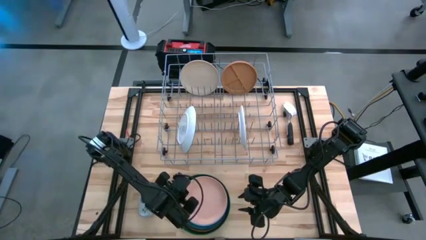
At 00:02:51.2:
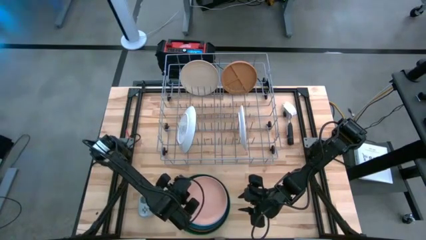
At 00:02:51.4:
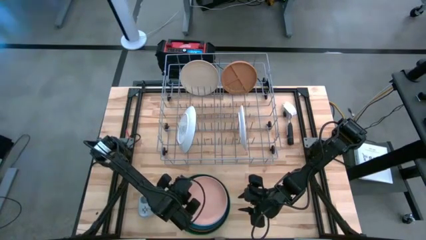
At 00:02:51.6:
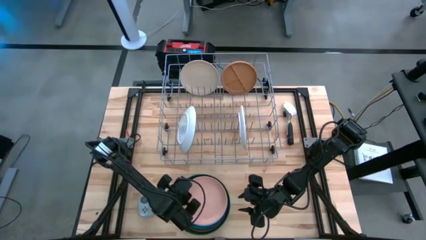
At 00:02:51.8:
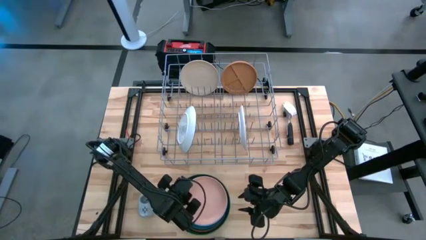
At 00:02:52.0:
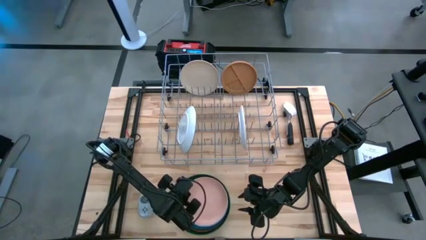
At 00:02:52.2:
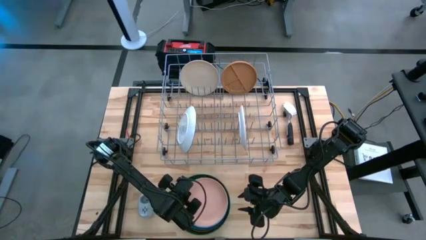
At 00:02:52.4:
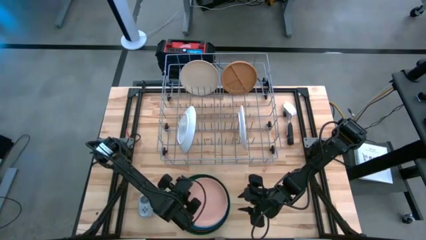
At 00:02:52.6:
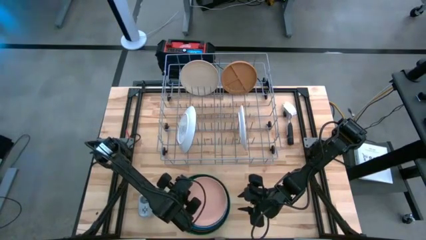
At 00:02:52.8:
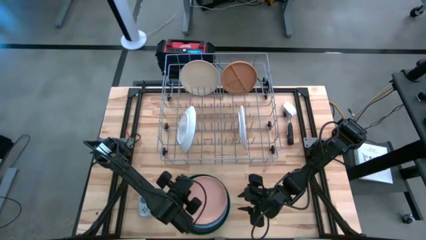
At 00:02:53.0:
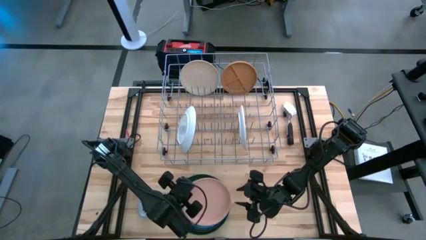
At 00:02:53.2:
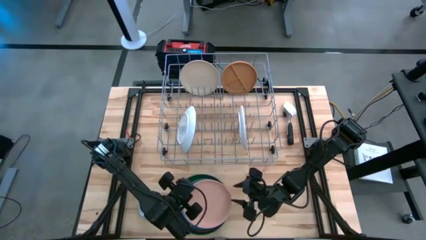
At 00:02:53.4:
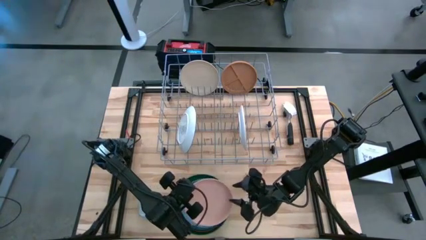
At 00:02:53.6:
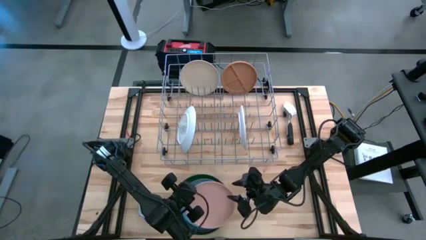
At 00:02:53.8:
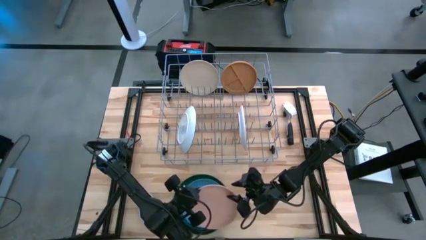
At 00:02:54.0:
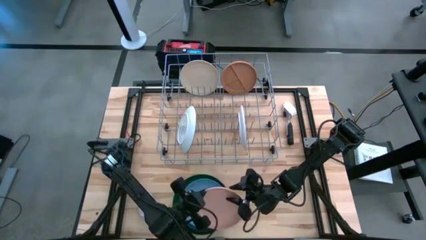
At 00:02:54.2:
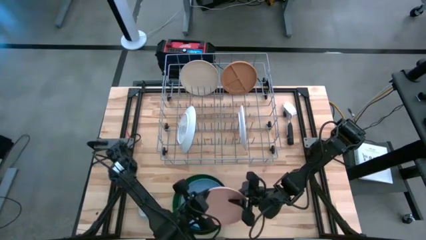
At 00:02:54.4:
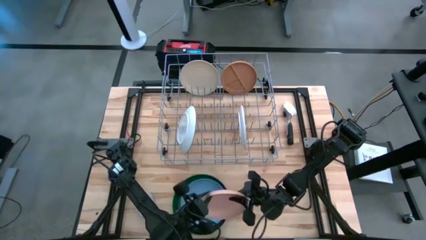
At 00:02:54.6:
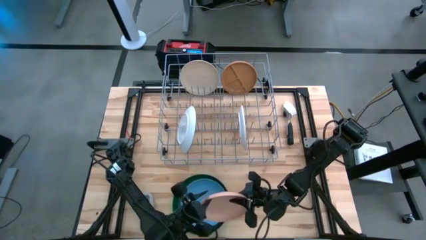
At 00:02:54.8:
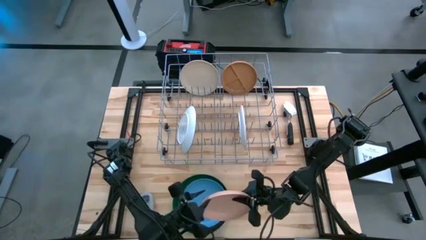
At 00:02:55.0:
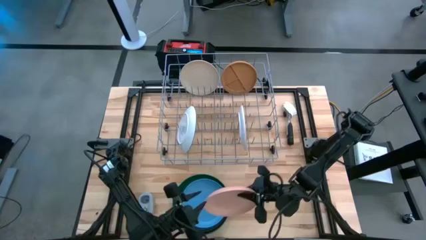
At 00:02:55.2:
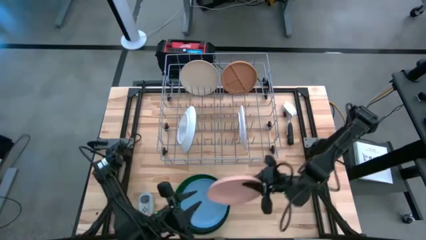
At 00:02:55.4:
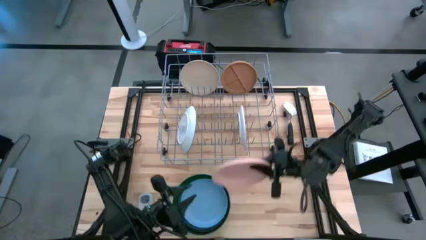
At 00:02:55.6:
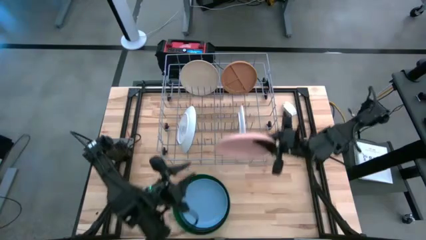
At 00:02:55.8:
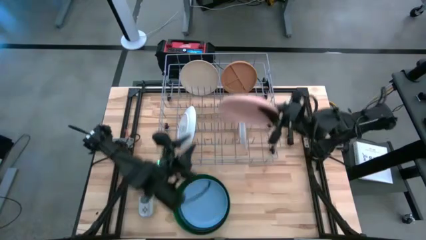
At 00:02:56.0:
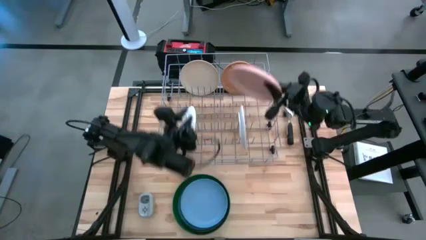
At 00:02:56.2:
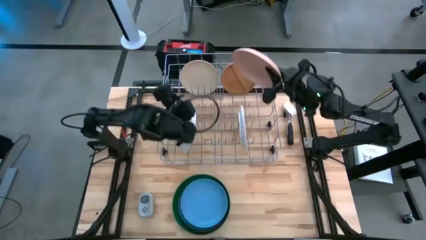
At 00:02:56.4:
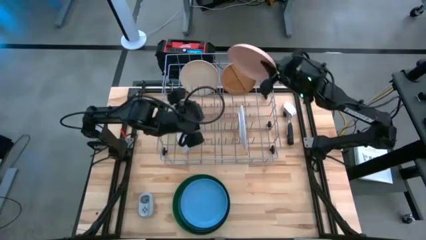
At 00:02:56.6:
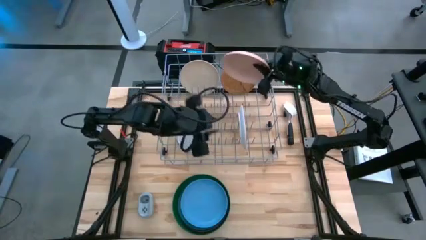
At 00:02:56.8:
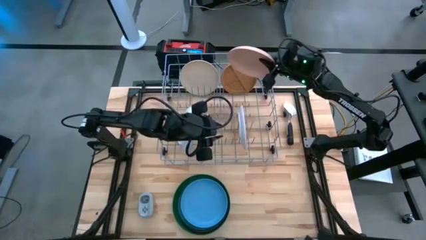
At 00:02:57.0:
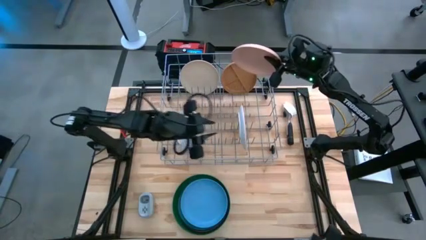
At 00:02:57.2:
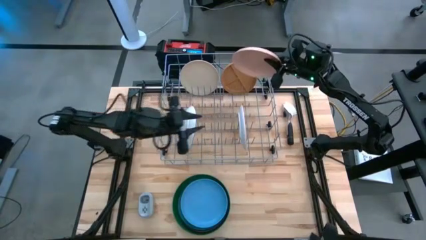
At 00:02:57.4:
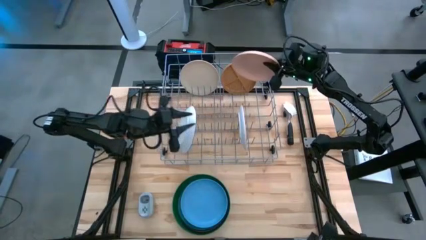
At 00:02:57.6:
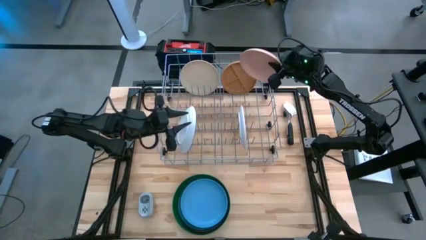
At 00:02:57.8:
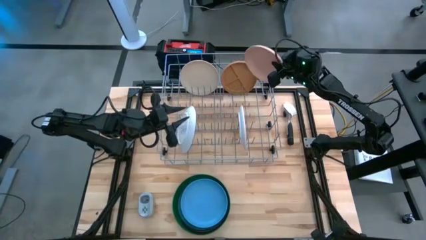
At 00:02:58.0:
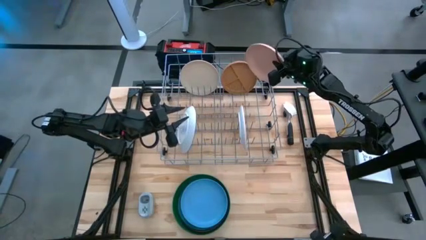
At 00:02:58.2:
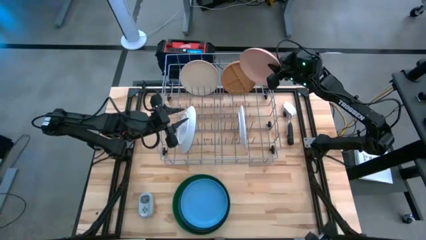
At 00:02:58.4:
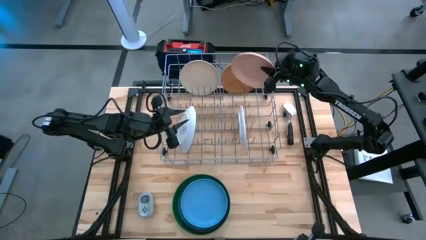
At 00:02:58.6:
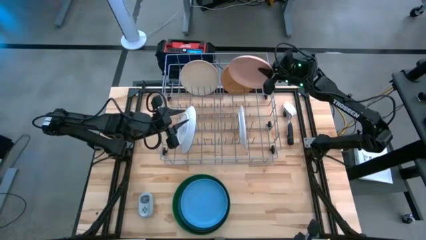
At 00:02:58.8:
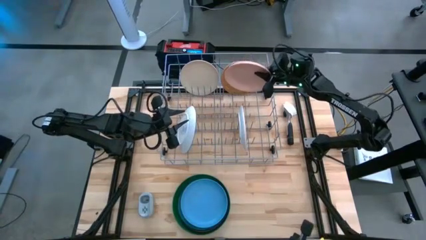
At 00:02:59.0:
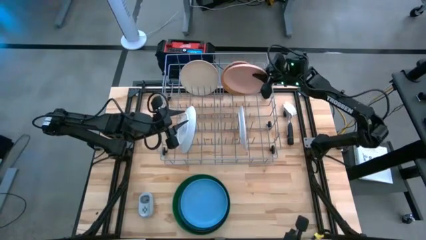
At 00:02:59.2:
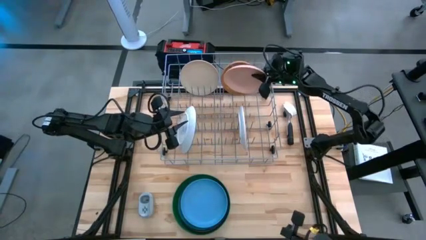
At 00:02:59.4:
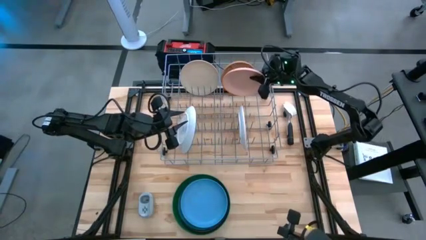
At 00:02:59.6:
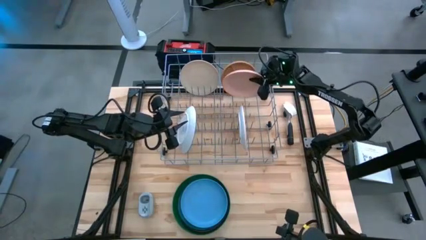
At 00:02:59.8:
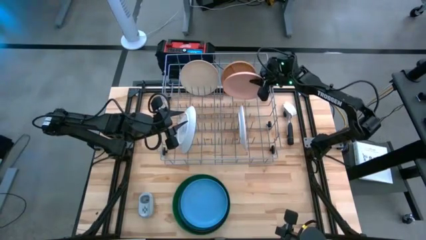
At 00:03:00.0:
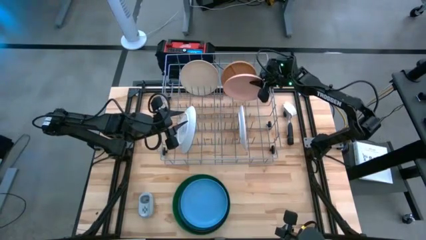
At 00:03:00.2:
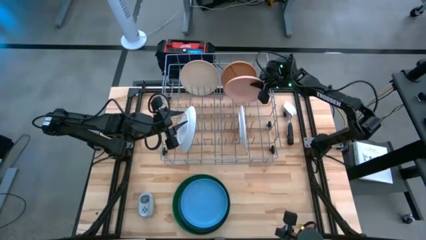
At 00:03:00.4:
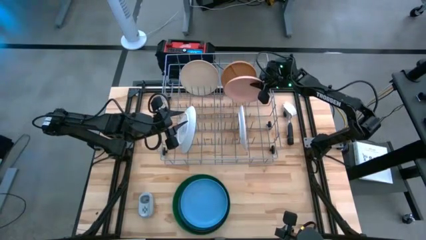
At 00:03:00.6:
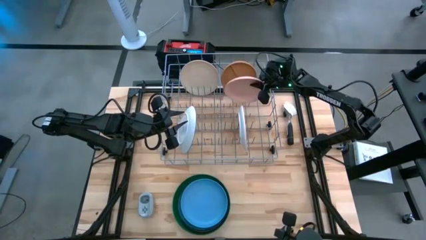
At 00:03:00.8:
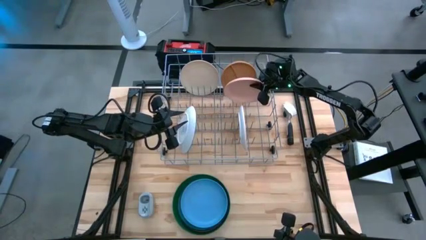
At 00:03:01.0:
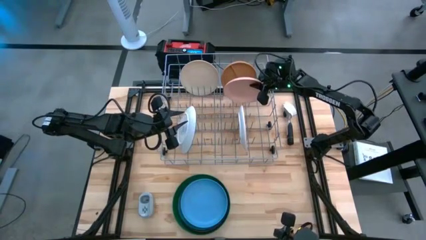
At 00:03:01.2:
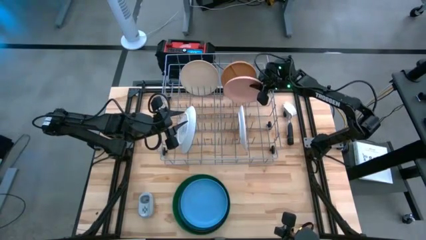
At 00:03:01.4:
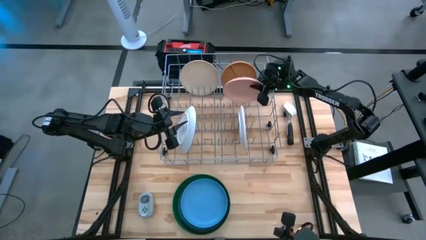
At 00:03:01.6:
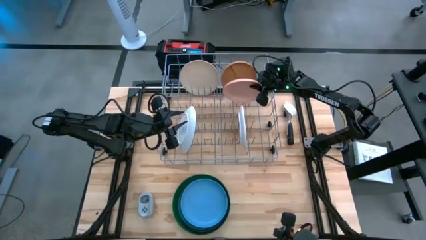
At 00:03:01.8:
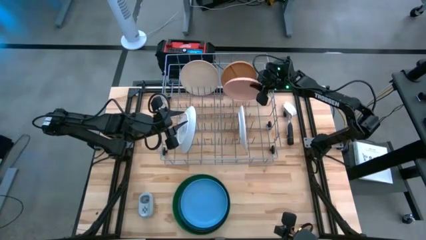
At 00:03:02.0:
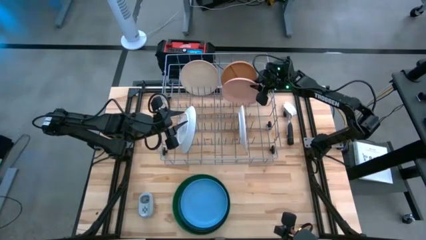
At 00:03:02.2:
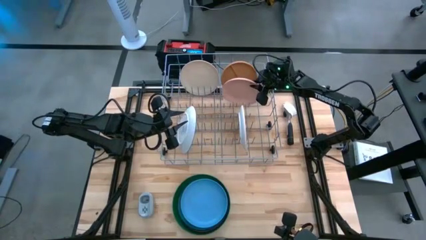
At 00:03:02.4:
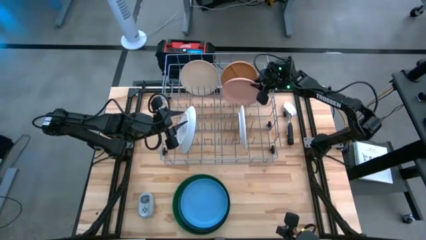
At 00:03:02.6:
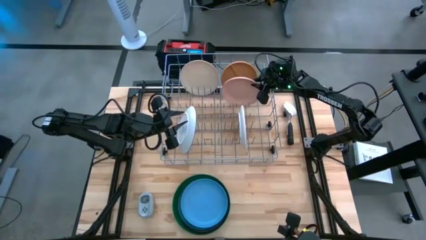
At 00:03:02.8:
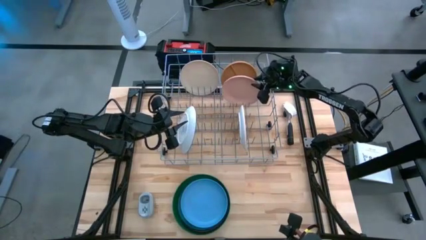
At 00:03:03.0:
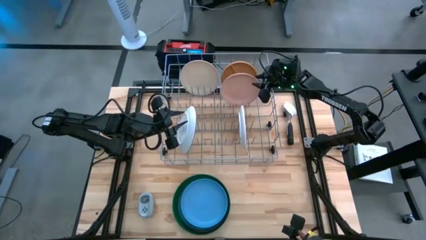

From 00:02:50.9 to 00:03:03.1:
Task: Sort dishes
Put the pink plate into the dish rack
